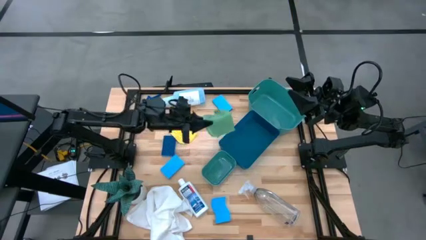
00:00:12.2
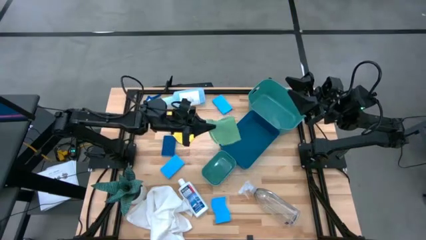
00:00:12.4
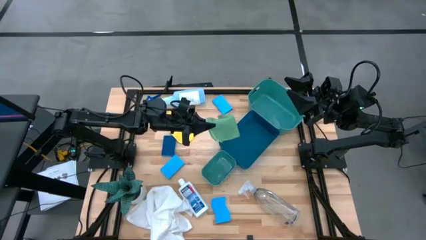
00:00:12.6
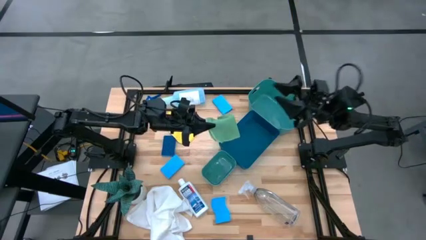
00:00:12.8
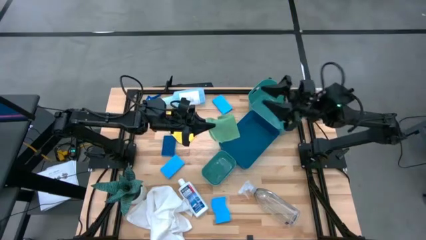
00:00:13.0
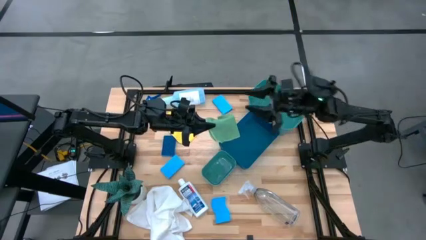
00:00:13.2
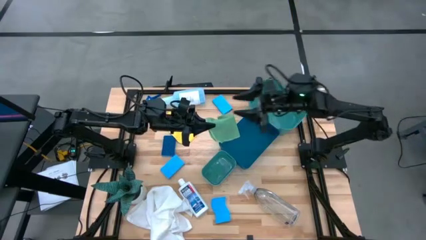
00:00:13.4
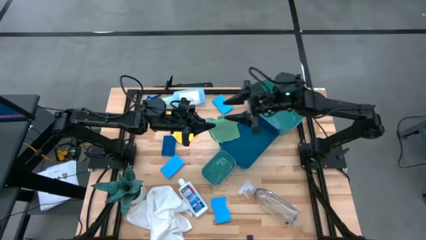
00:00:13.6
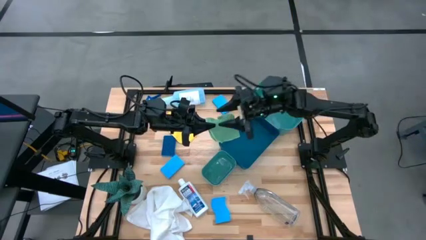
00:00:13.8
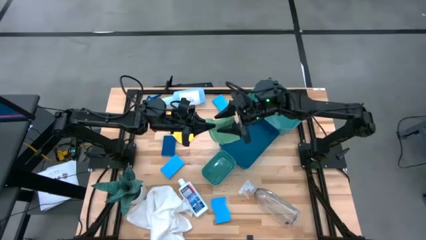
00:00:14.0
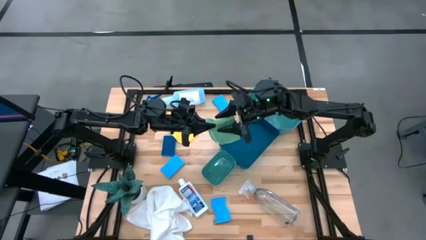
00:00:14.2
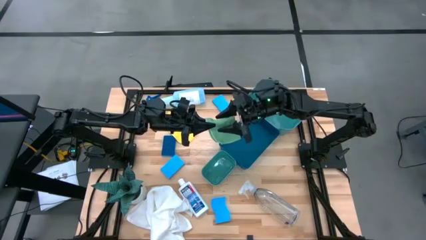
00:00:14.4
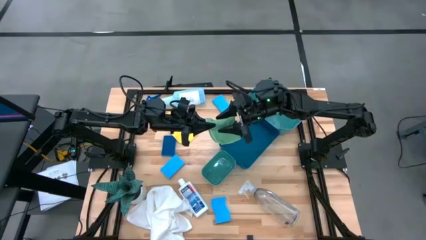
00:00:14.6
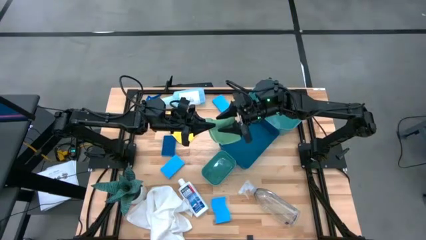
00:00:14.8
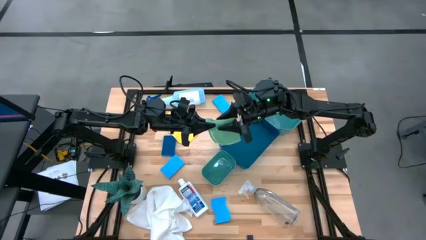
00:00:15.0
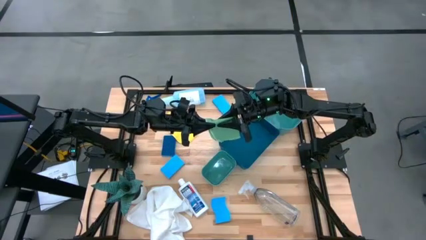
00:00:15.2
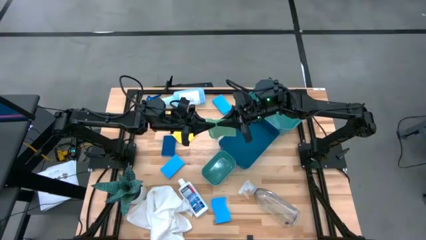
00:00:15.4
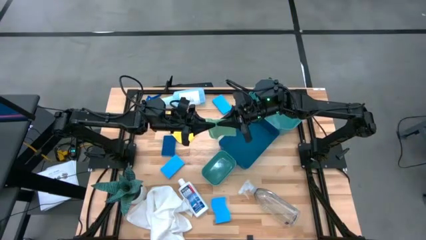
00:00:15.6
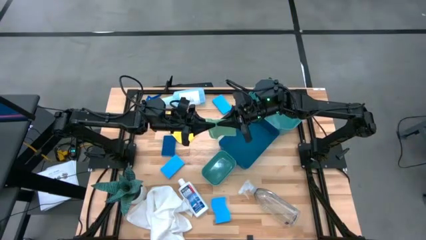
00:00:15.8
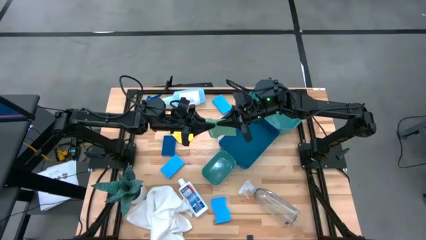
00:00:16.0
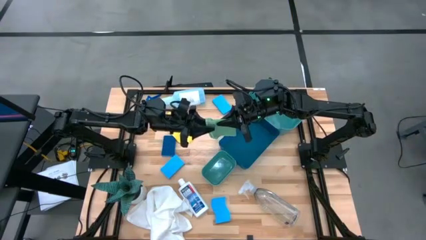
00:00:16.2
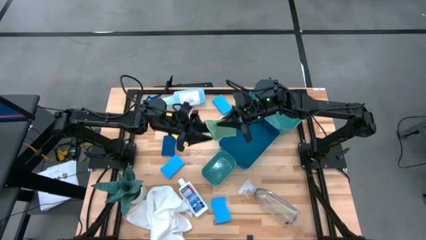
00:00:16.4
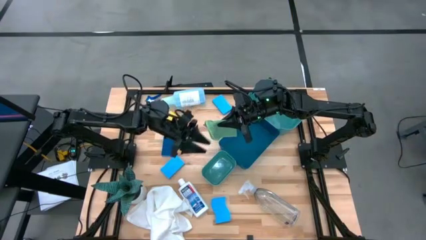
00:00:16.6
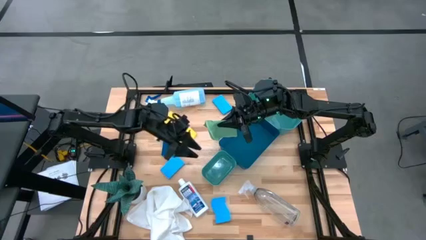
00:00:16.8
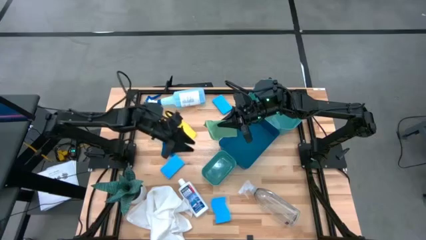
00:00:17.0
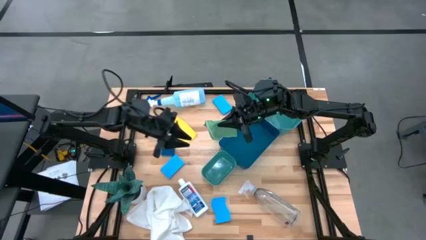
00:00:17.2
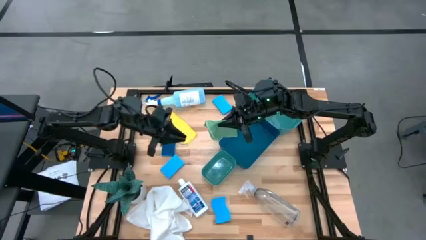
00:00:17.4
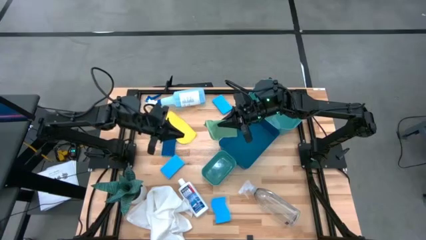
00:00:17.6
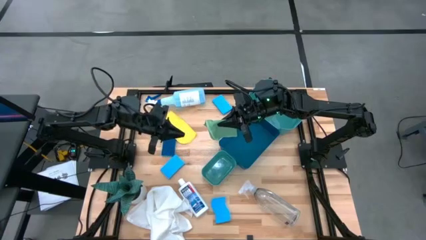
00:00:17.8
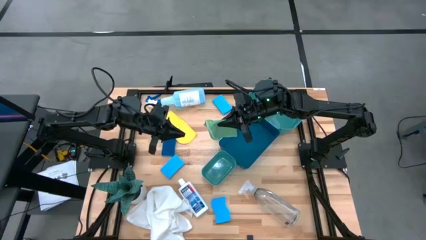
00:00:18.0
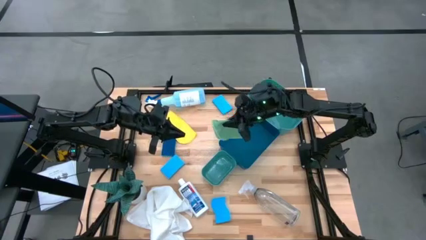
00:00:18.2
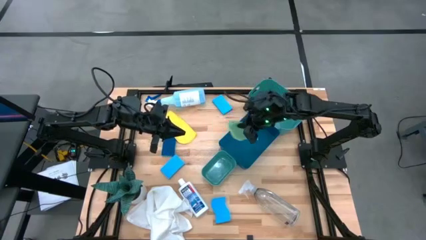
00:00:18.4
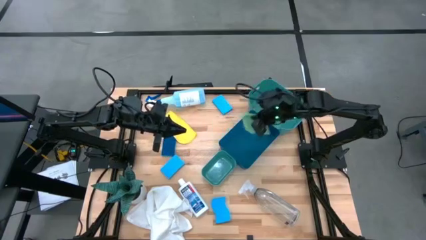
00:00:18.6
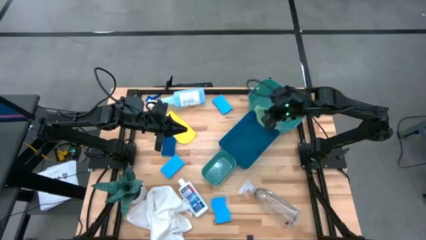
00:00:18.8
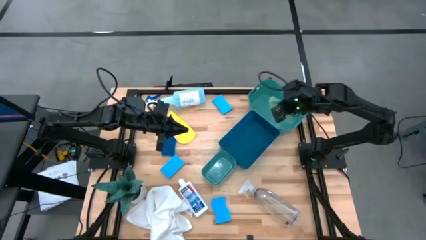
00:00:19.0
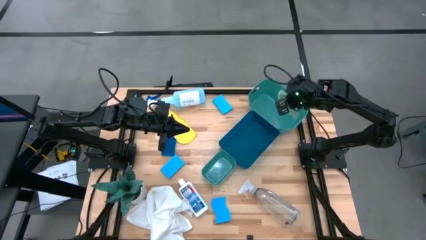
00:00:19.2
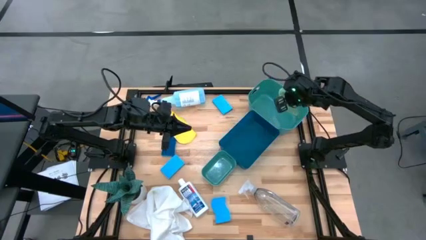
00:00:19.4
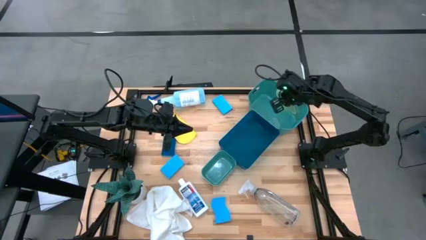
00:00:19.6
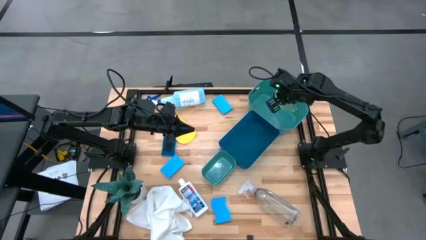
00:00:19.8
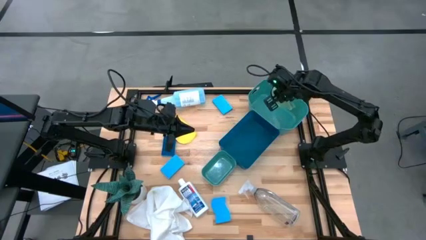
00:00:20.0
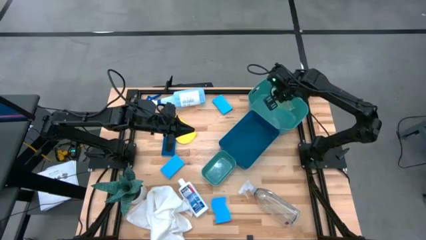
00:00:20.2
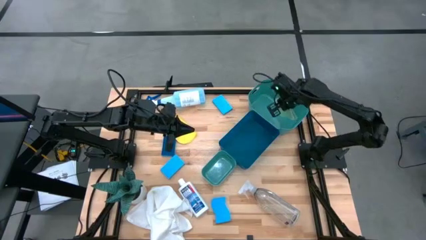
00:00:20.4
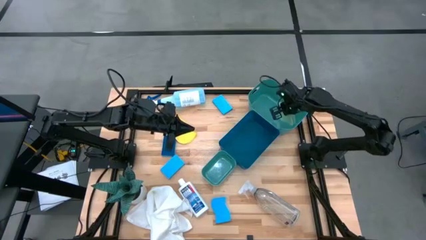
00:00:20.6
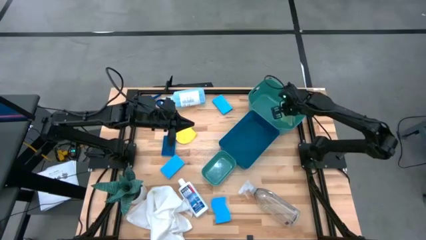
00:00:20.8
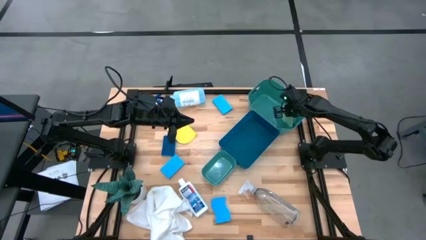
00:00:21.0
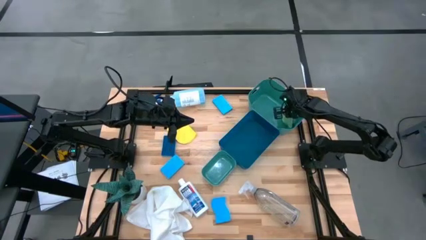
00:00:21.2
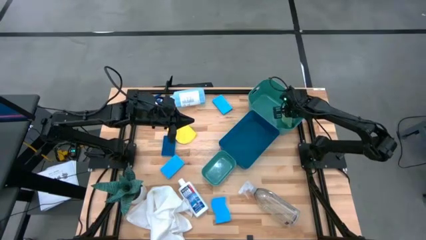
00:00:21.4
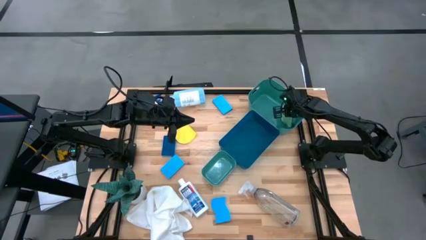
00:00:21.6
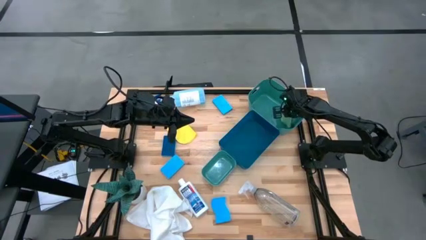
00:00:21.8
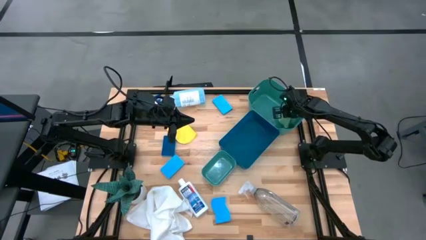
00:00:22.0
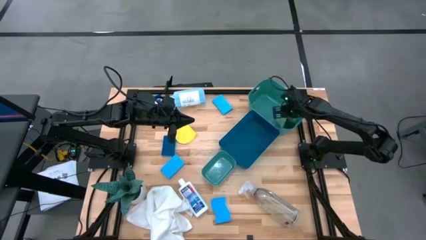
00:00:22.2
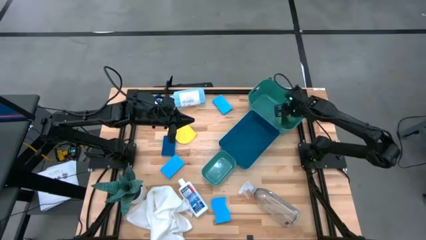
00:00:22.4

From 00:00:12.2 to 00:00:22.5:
Task: Pick & Place Kitchen Items
Put the green microfiber cloth into the top green bin

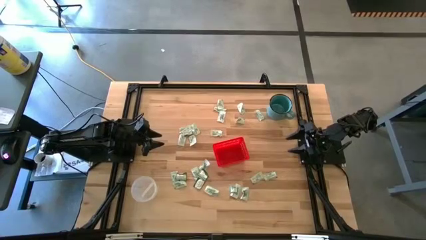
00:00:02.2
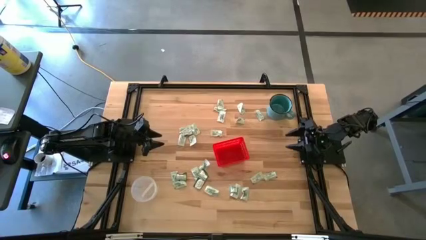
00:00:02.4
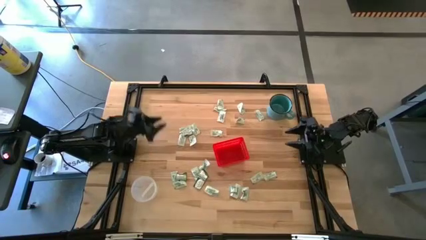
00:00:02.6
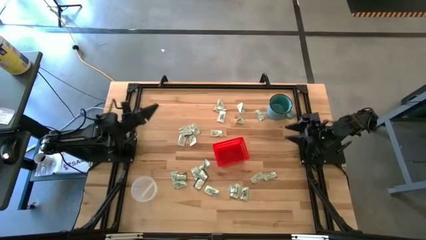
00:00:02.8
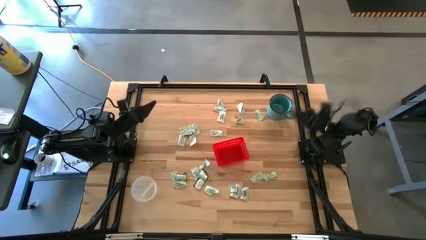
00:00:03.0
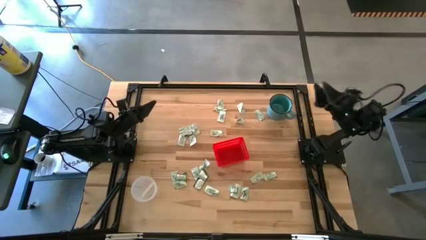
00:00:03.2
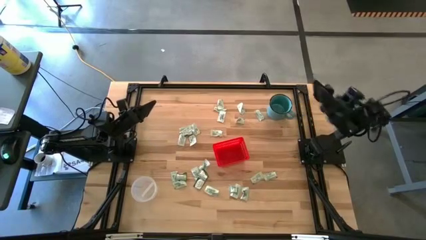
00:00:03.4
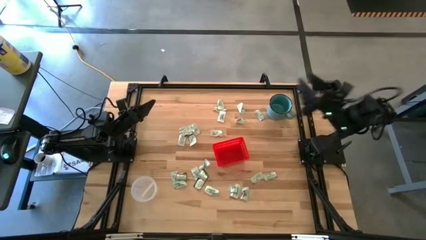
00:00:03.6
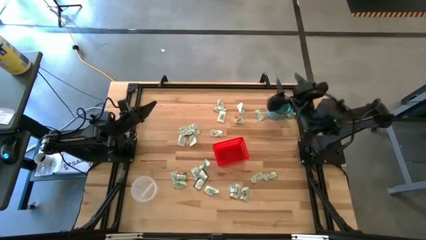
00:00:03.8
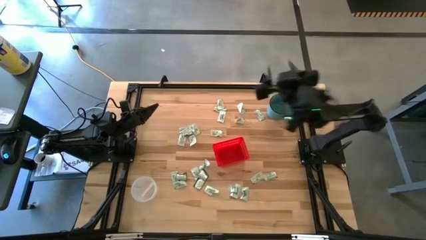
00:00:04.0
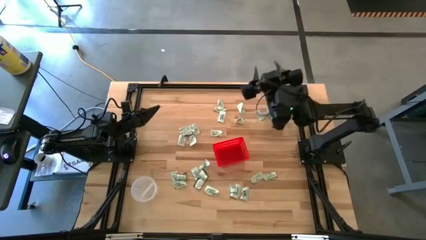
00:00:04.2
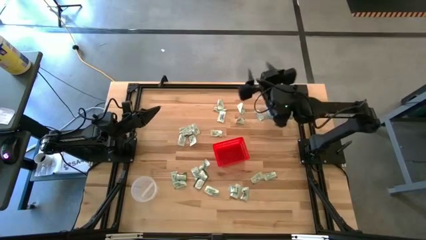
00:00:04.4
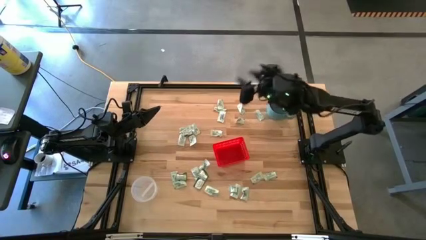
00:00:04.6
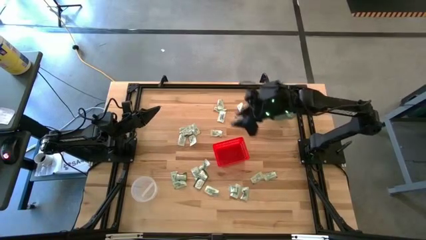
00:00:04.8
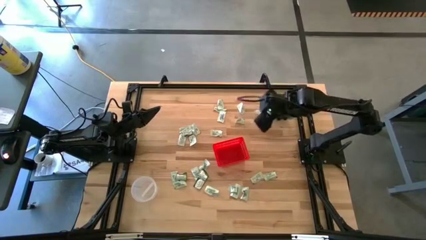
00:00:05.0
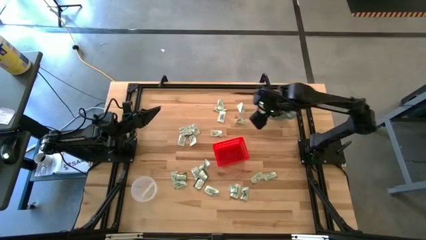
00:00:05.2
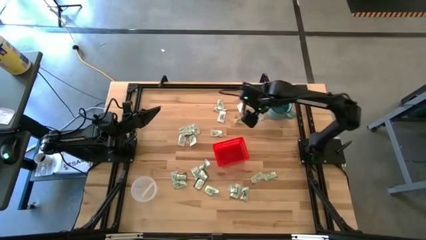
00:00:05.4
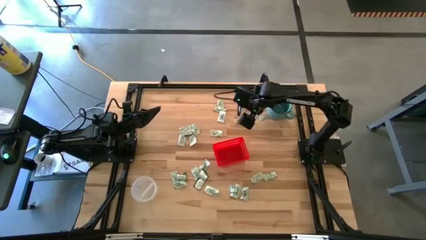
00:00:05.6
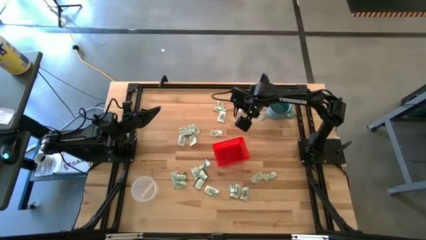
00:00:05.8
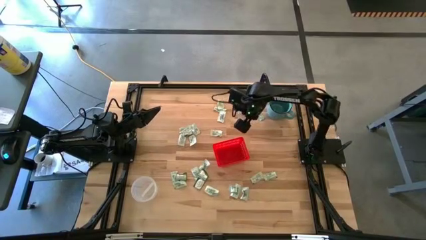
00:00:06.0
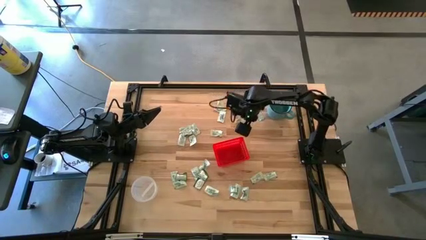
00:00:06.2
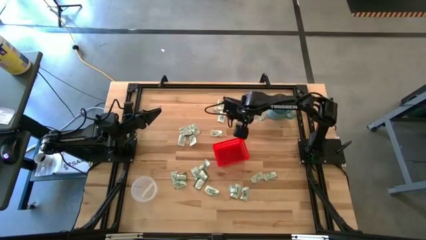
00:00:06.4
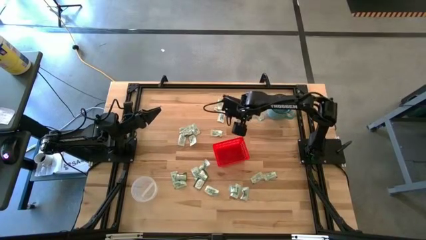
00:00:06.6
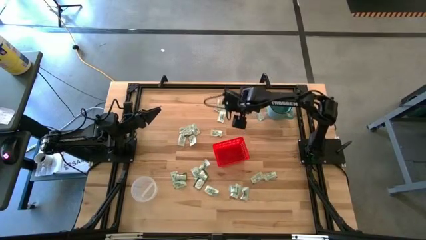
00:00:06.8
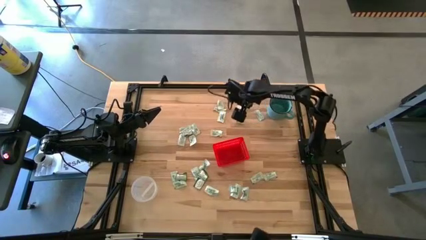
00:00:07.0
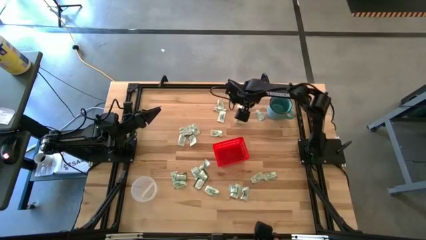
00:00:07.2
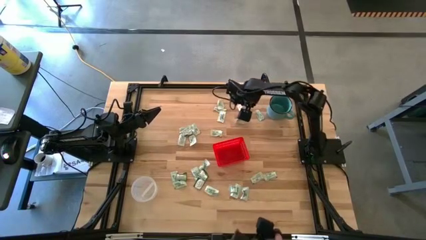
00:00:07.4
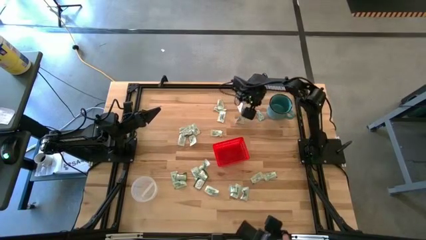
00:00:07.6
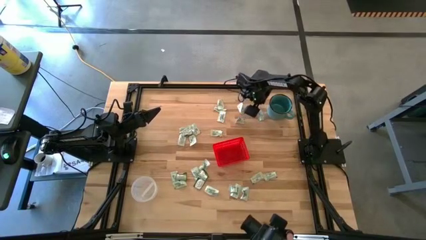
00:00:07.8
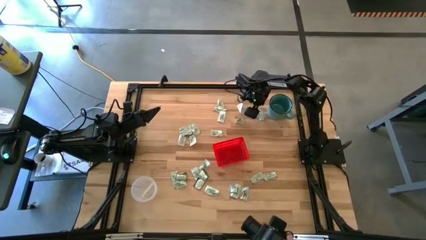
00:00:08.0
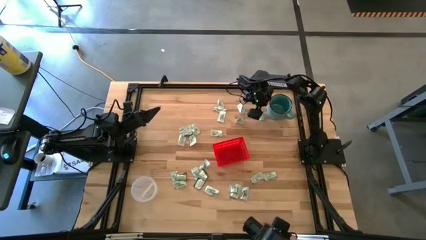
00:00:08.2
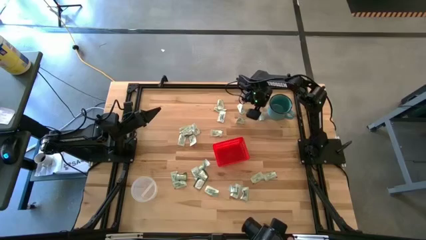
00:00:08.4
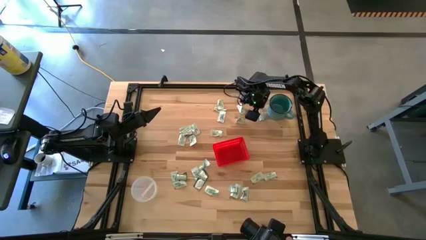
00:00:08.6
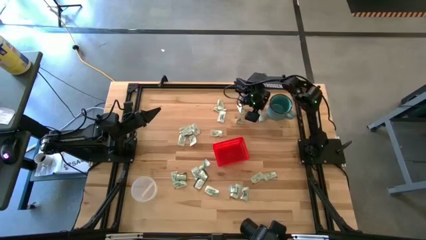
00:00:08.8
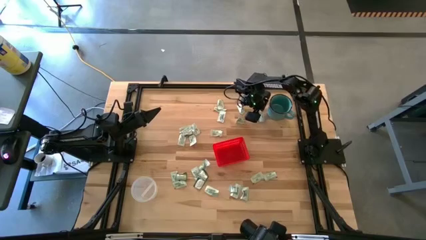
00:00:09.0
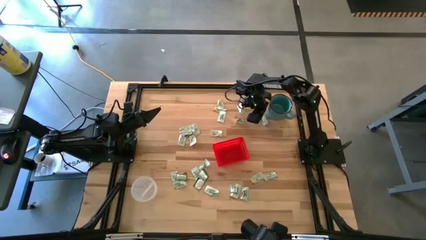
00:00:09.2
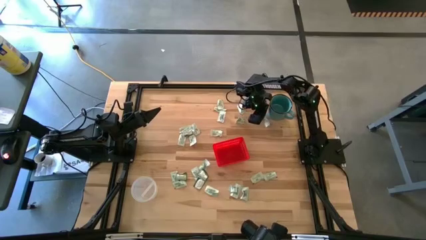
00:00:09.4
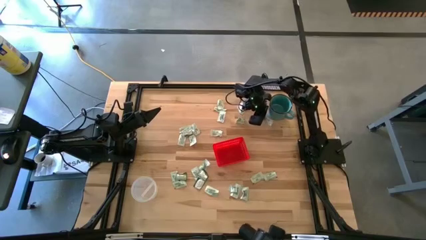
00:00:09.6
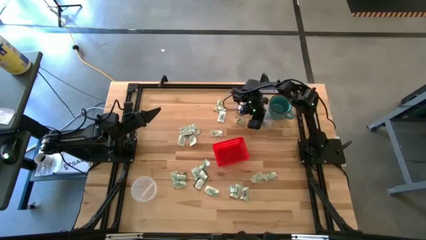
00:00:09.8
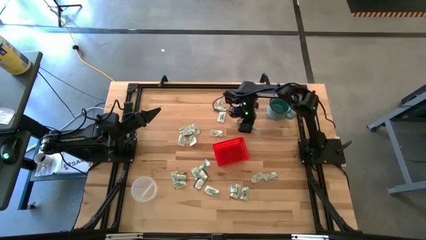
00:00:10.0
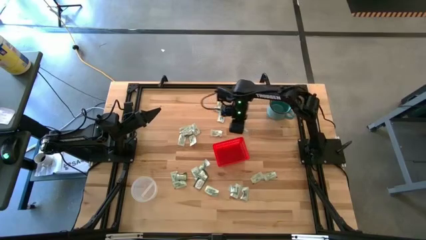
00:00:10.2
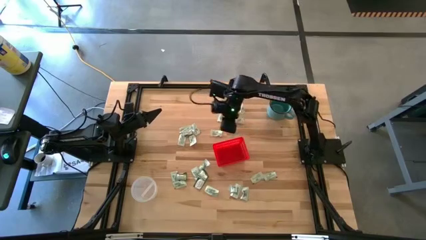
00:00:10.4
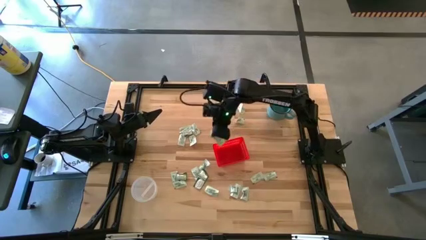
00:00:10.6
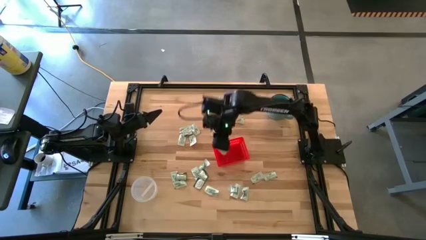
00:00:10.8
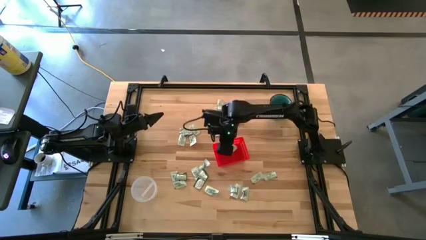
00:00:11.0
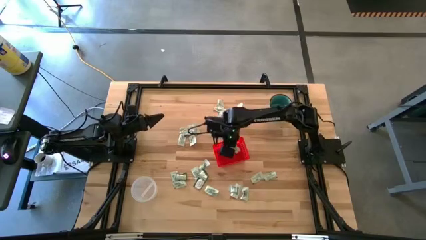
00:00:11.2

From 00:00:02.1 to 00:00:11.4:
Task: Pick and place items into bin
Put the white stevia pack into the red bin
